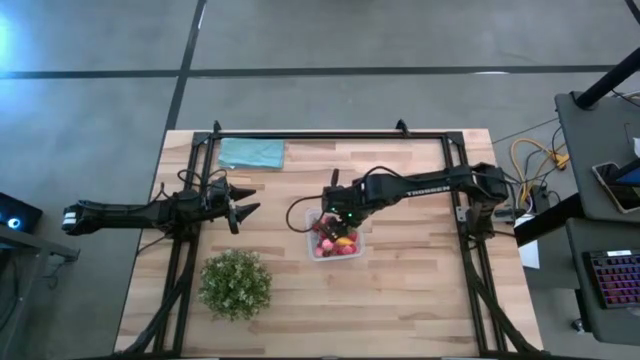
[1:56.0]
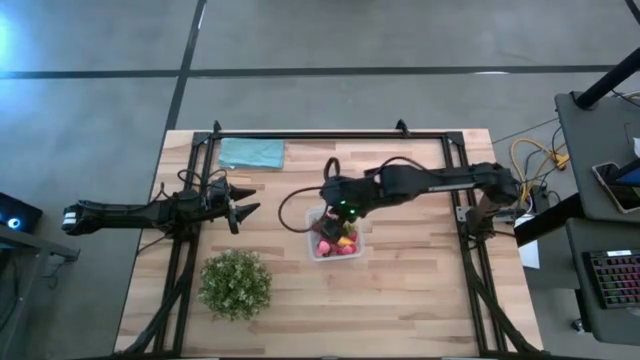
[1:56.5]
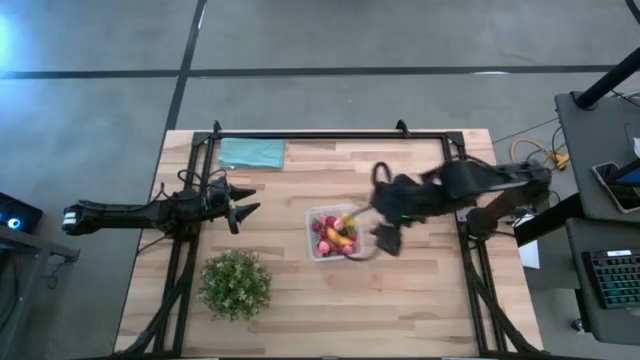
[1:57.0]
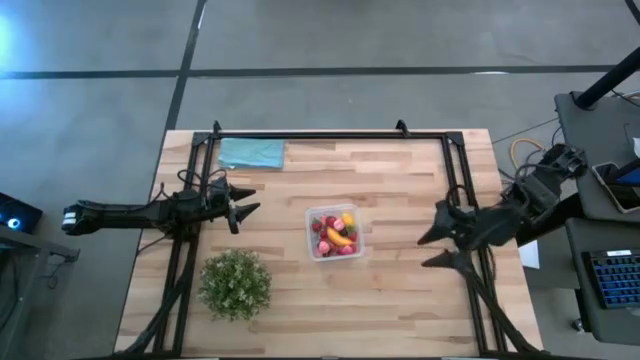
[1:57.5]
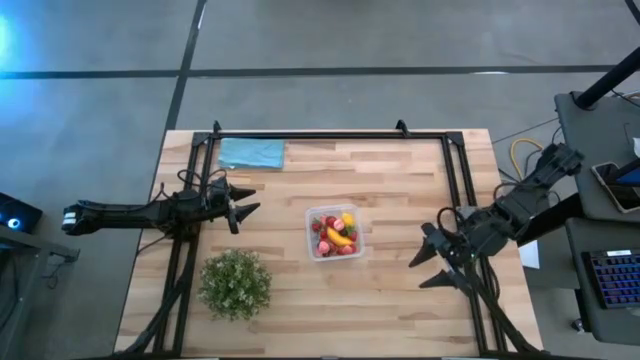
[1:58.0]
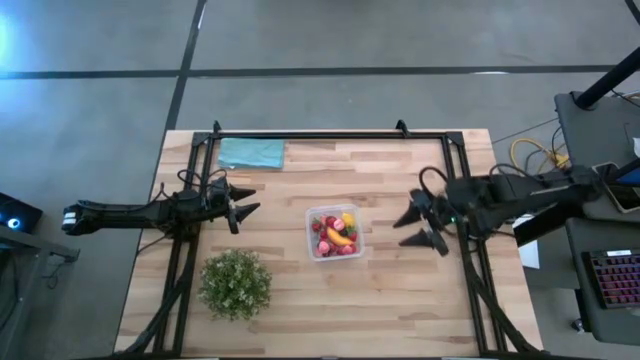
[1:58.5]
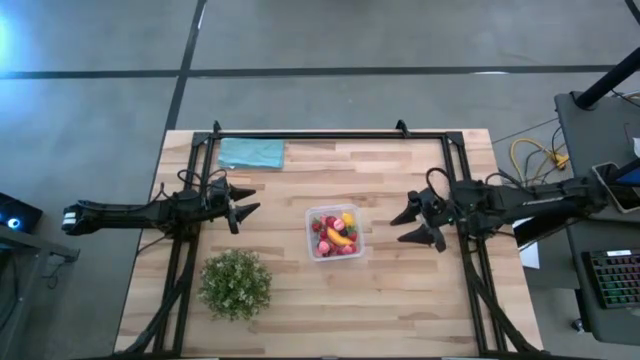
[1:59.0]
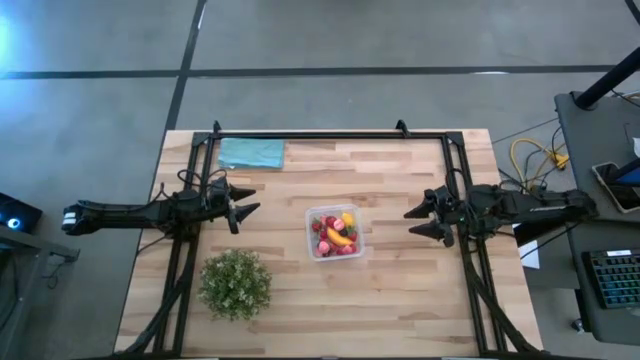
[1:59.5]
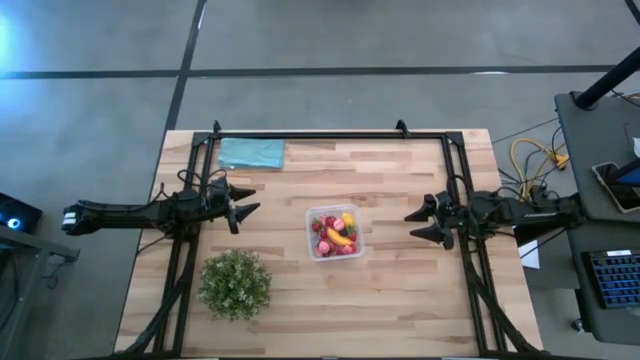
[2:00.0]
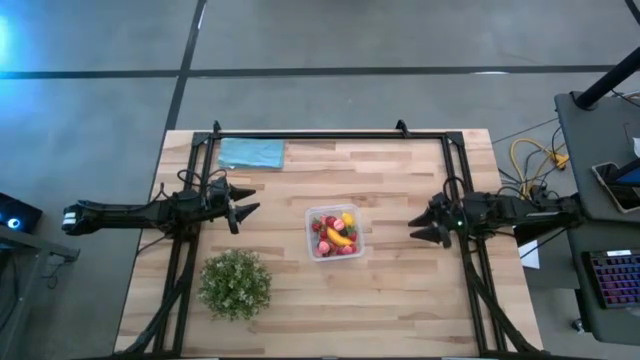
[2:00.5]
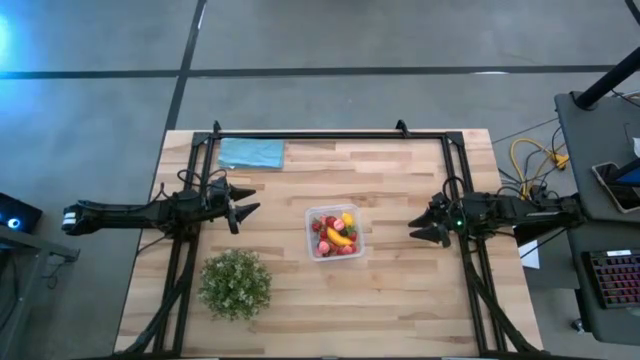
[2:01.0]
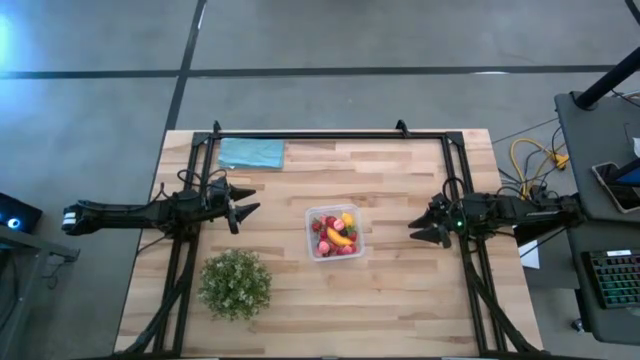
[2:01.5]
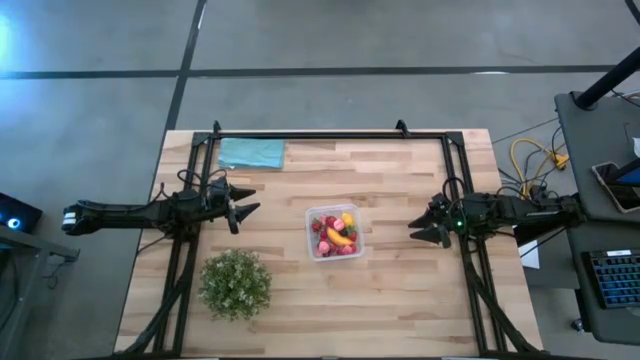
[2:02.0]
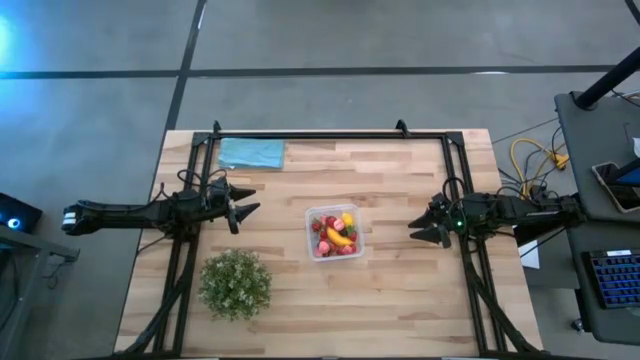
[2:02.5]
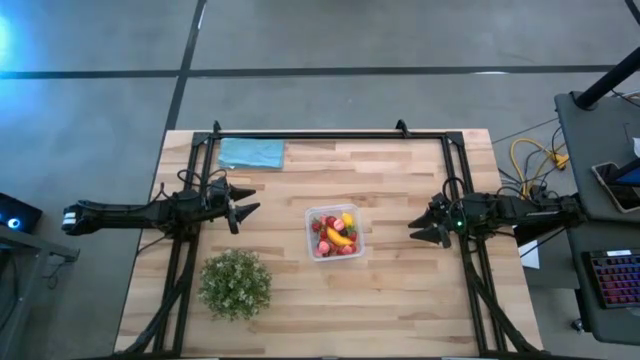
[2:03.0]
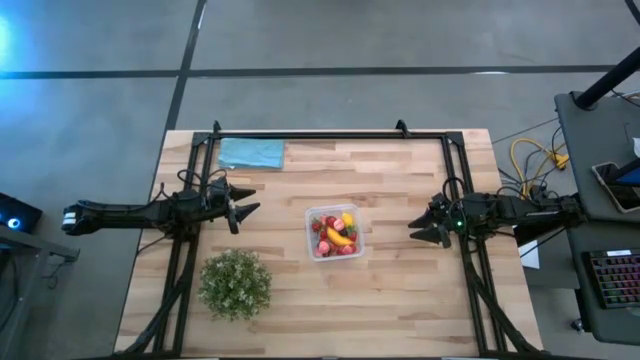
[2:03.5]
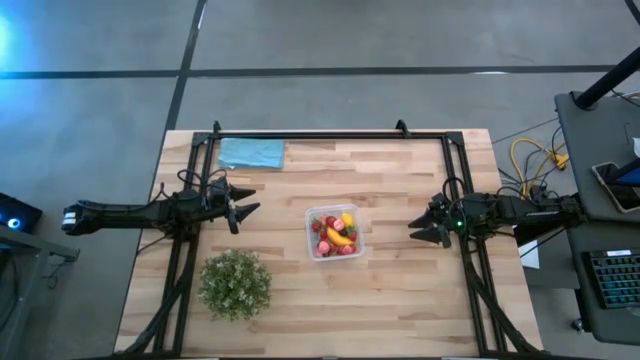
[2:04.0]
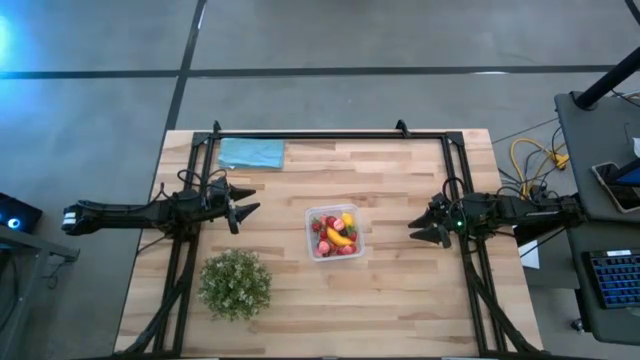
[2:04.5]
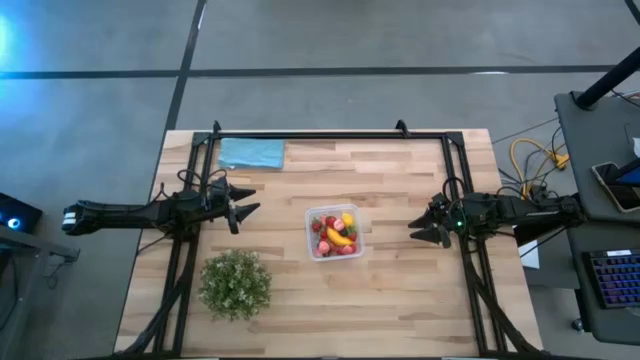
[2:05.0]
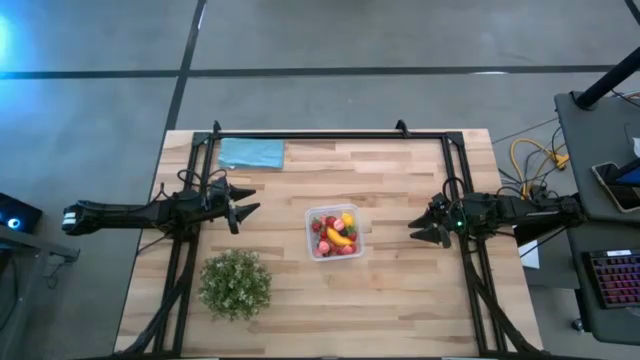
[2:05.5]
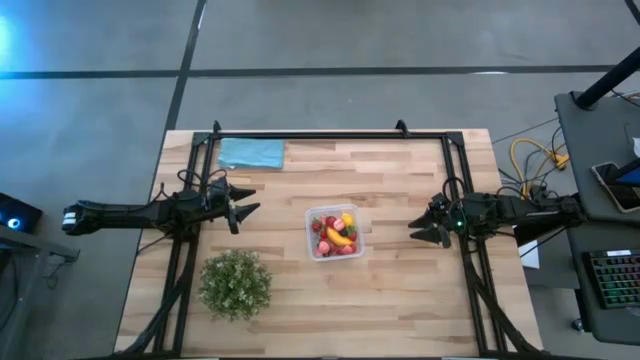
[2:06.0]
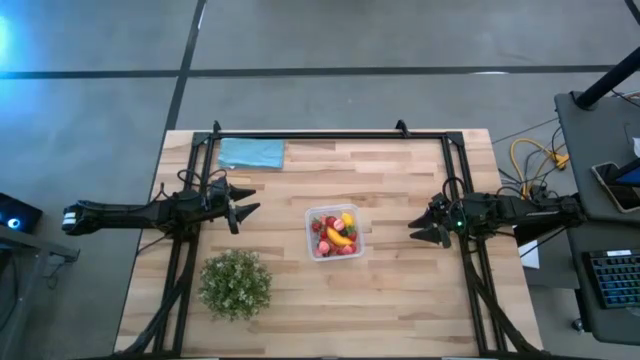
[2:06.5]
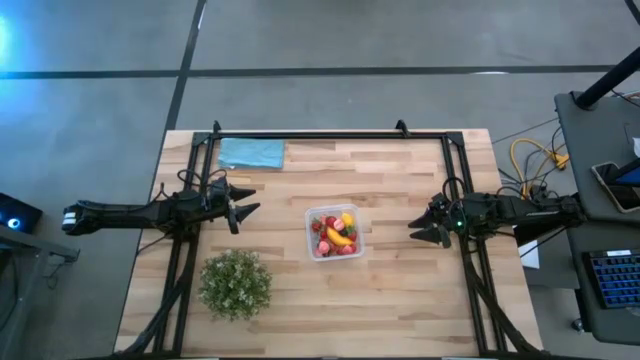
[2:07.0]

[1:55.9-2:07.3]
Task: Pick and placing Produce into tupperware
Return to Home Position

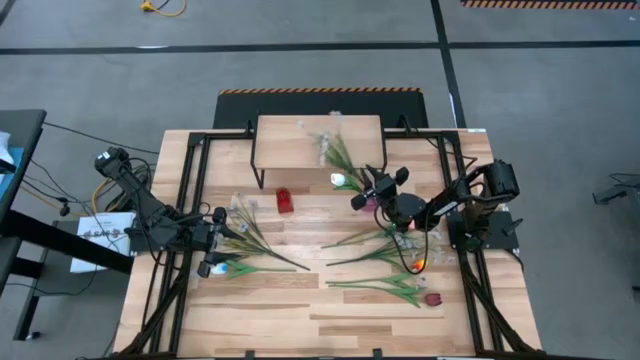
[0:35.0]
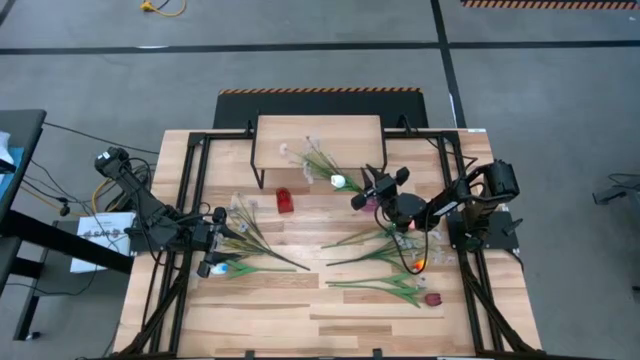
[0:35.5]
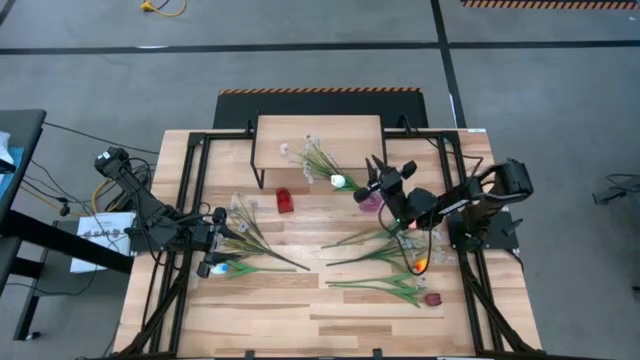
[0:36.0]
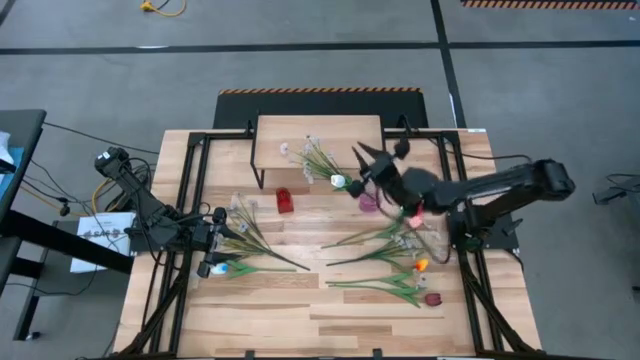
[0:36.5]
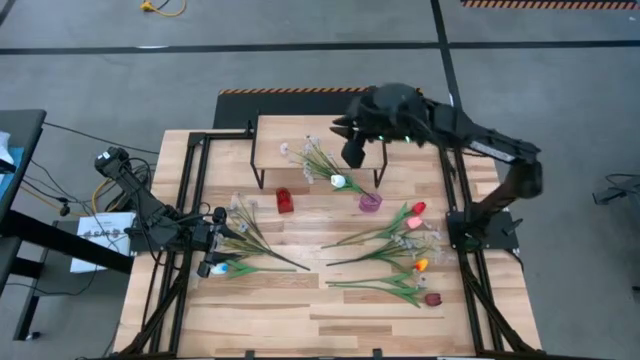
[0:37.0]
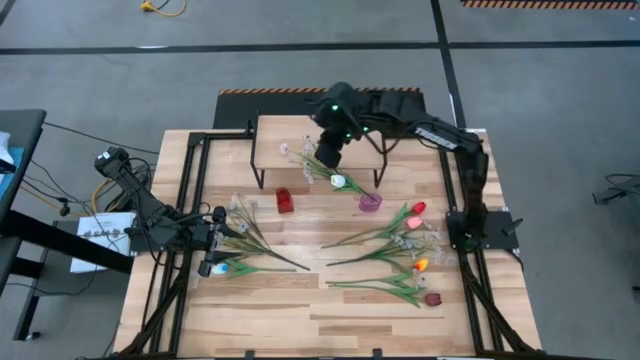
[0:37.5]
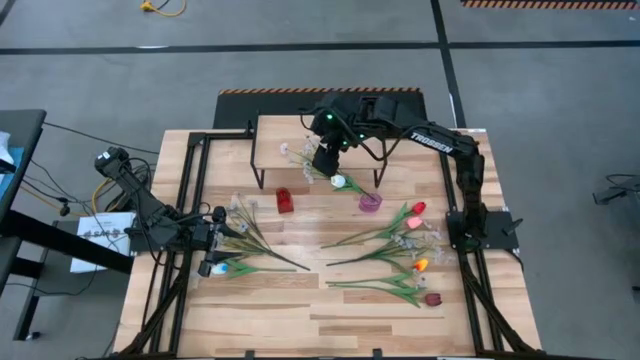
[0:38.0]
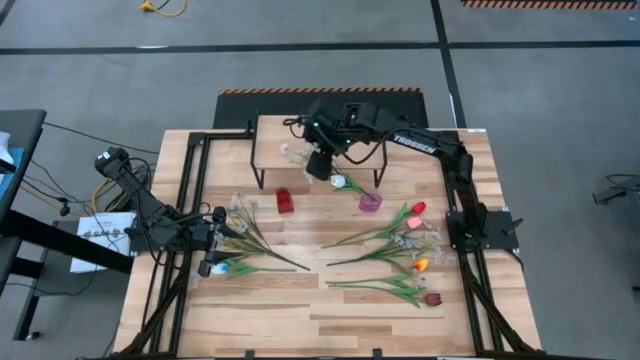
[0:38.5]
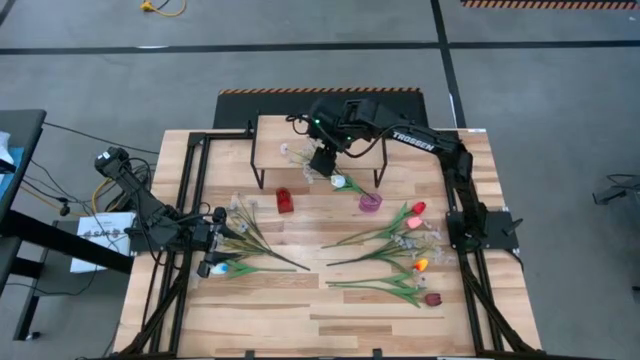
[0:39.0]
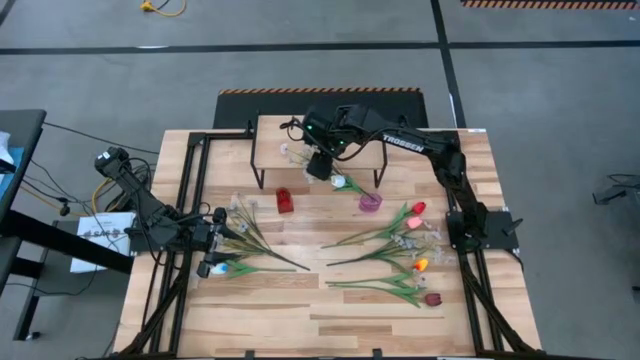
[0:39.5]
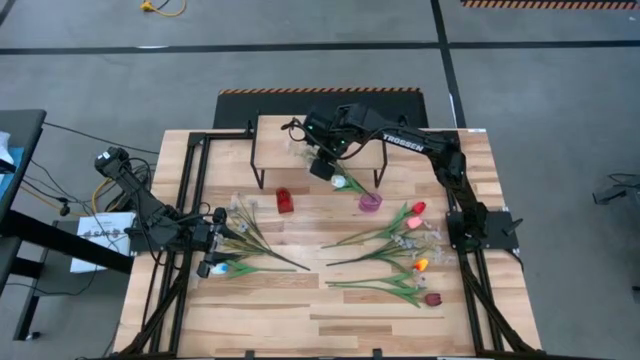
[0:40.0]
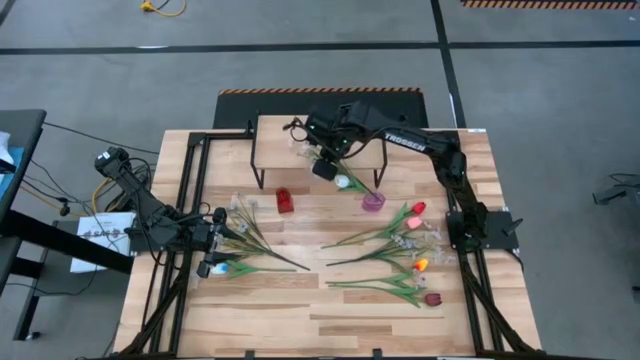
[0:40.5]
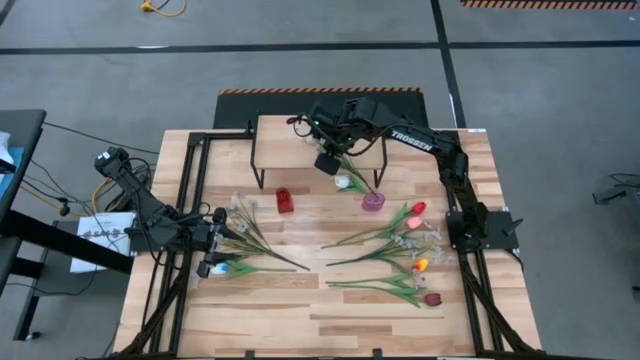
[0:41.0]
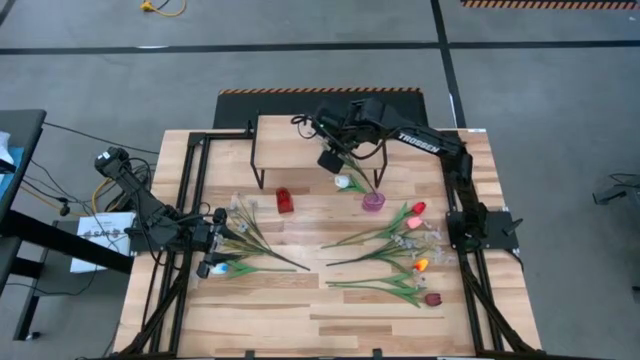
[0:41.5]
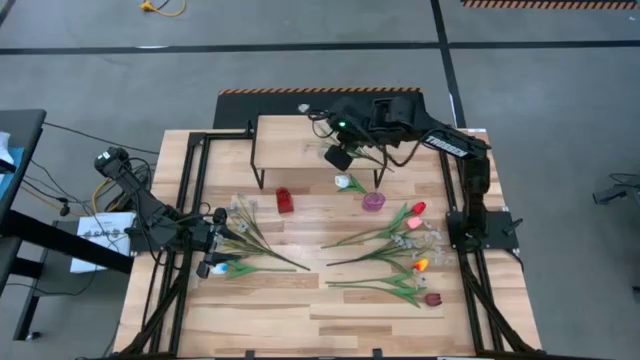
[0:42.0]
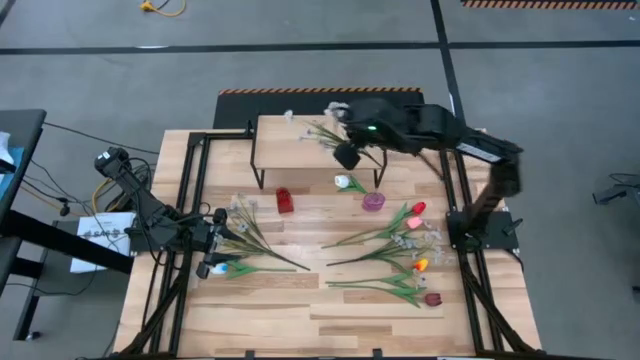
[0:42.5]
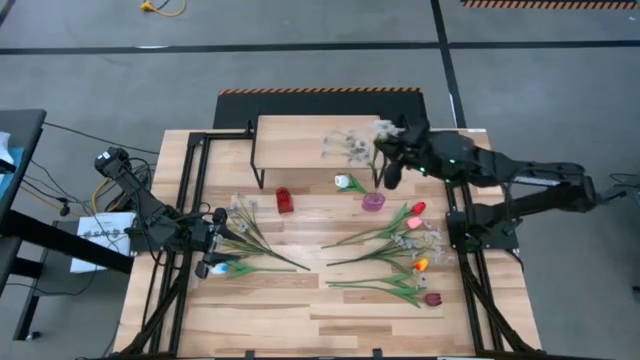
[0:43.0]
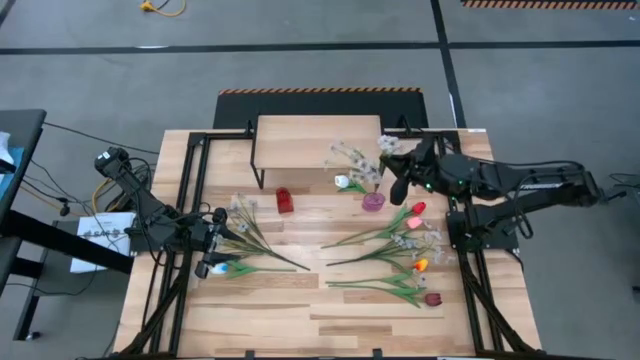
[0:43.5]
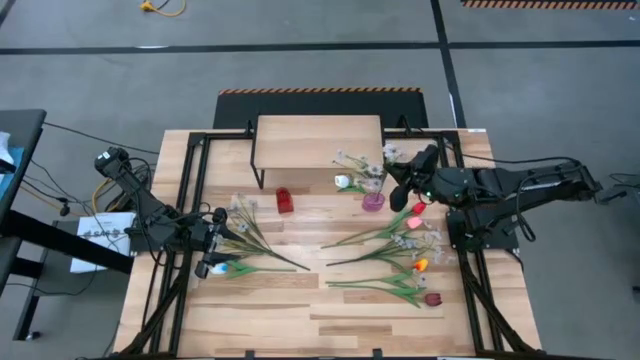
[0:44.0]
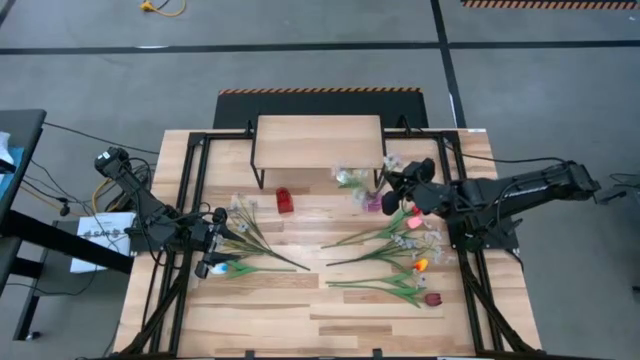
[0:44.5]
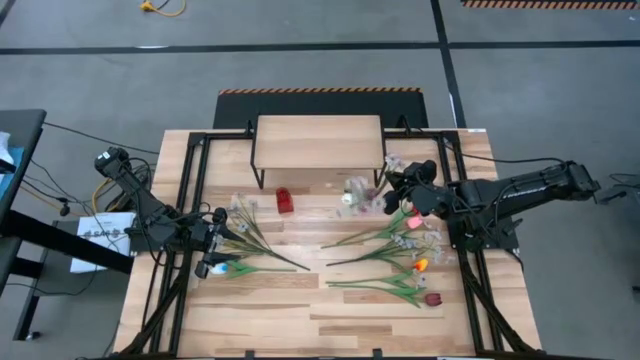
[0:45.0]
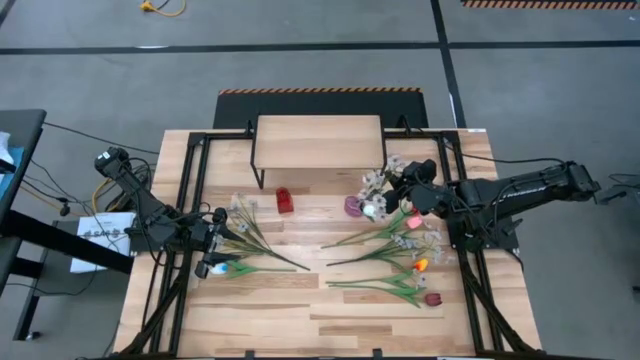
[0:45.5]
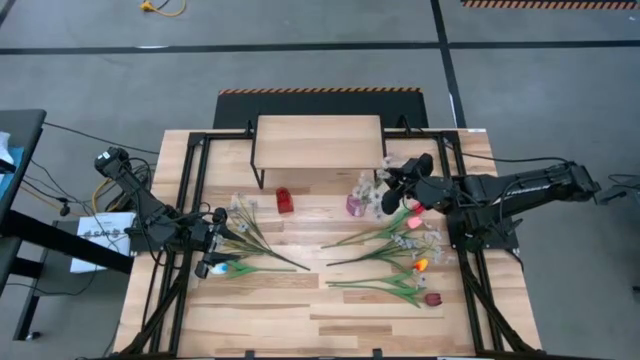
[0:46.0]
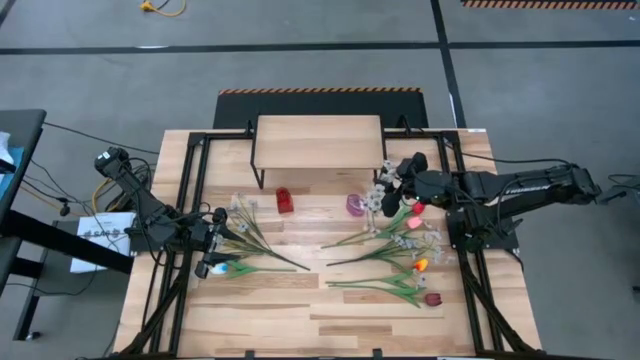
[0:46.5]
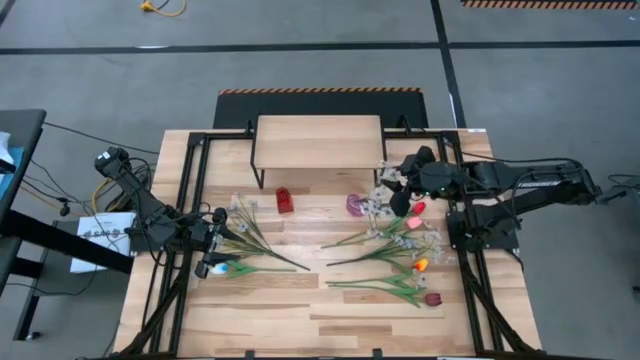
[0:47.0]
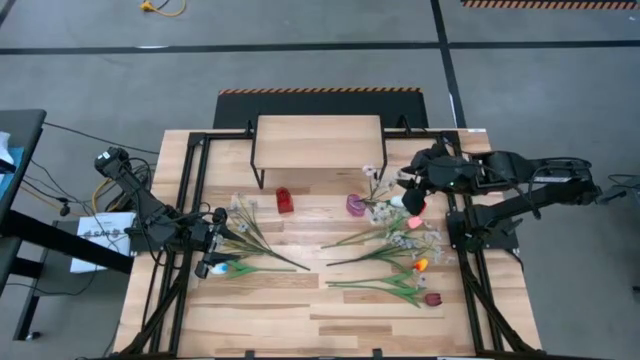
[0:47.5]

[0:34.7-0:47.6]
Task: Pick and place flowers into a vace then onto a shelf
Put the bottom white flowers into the pink vase
